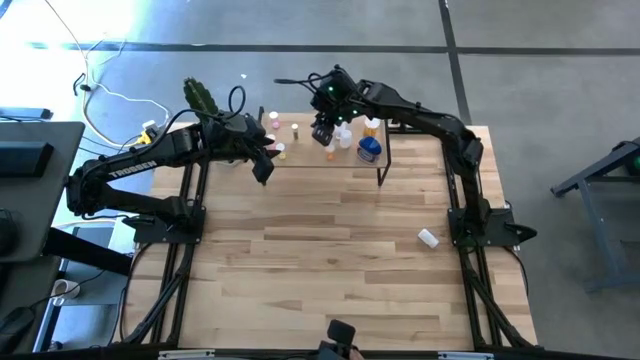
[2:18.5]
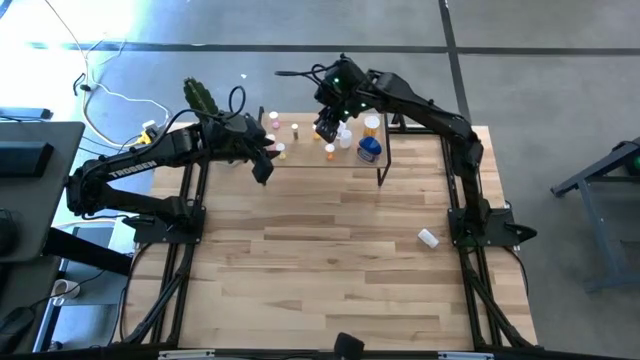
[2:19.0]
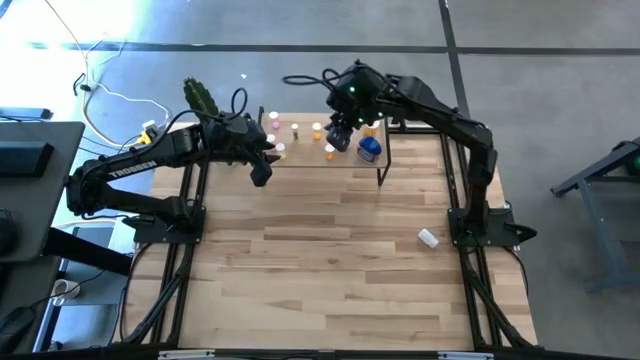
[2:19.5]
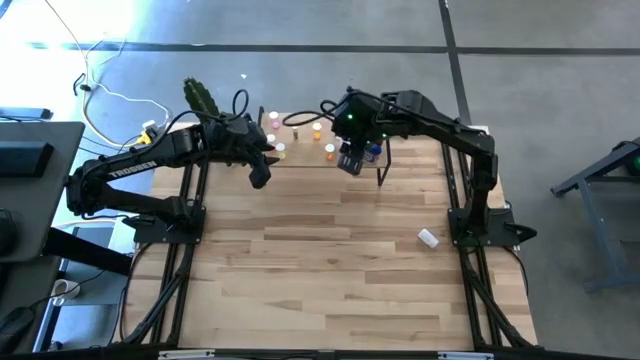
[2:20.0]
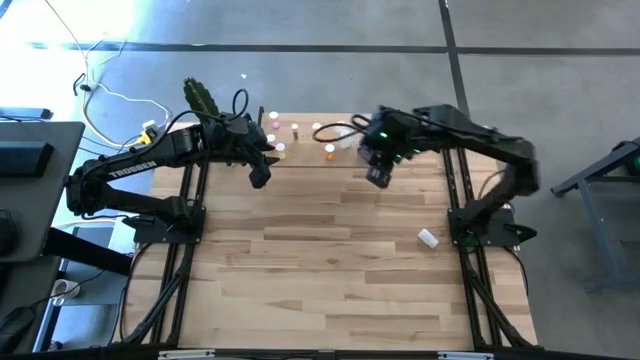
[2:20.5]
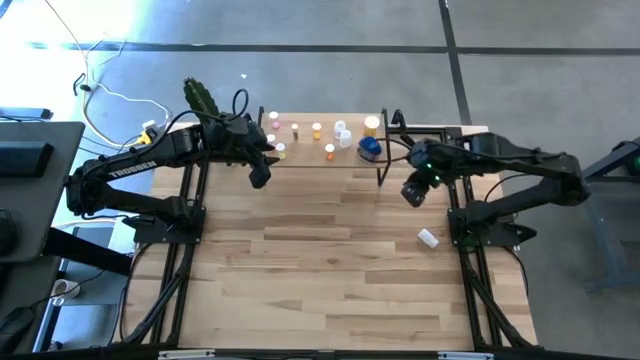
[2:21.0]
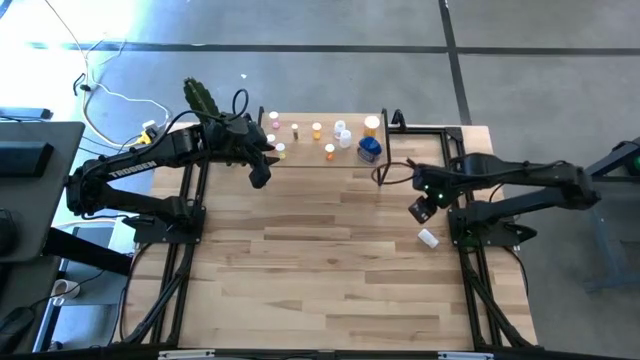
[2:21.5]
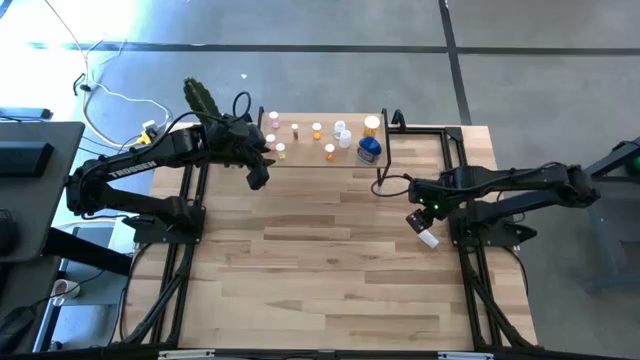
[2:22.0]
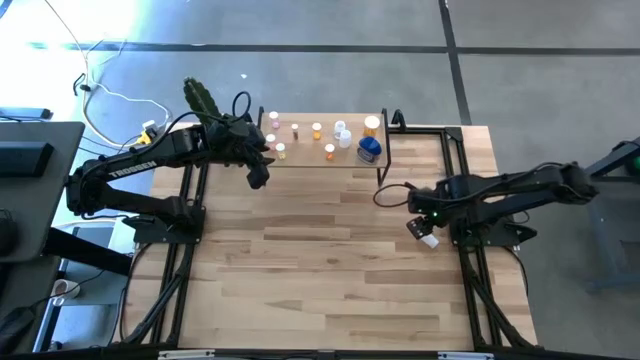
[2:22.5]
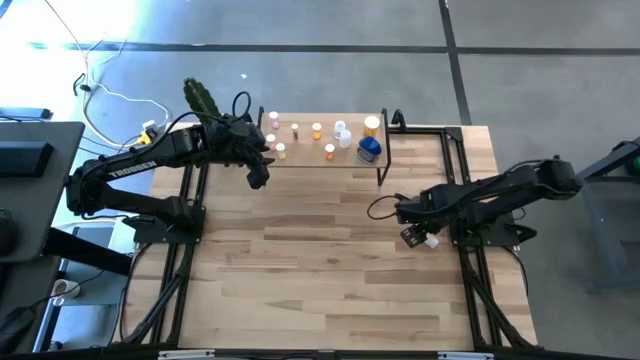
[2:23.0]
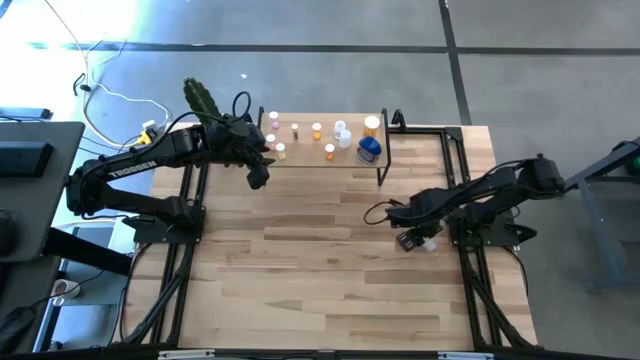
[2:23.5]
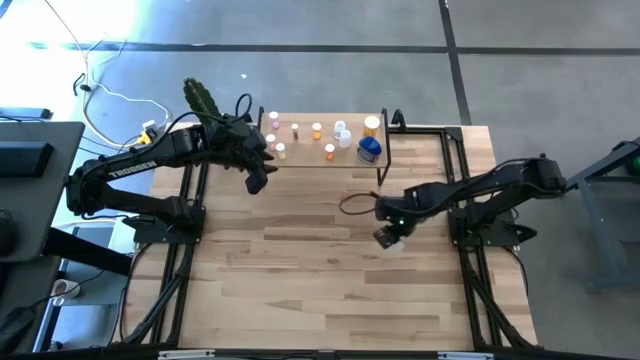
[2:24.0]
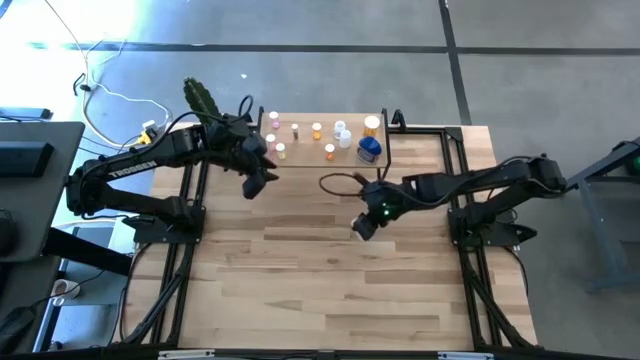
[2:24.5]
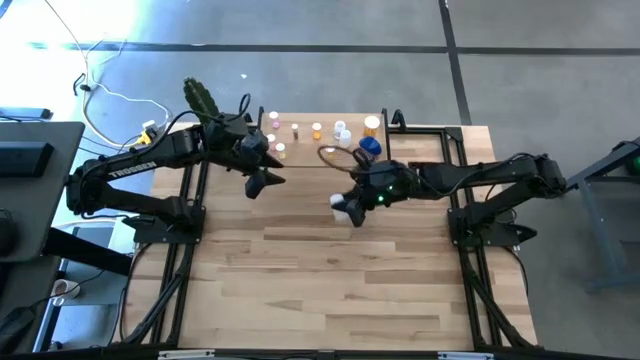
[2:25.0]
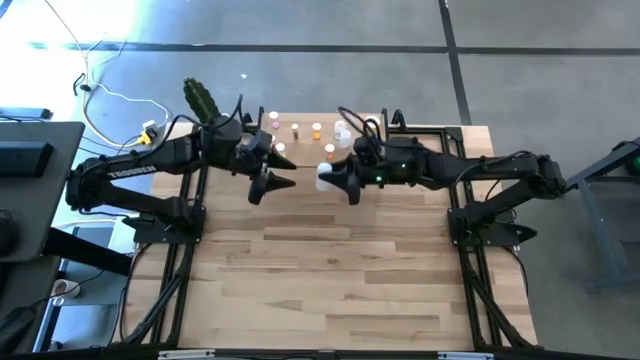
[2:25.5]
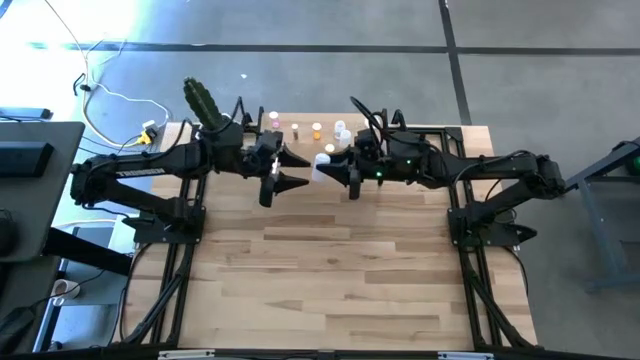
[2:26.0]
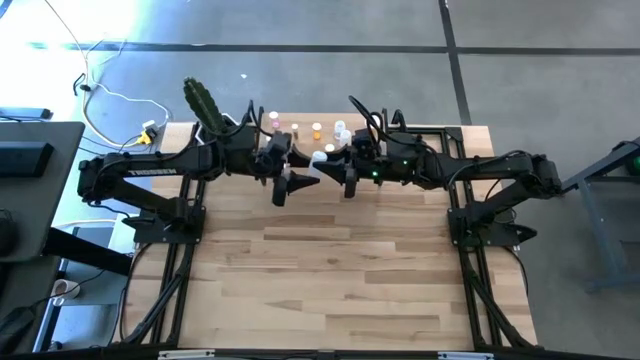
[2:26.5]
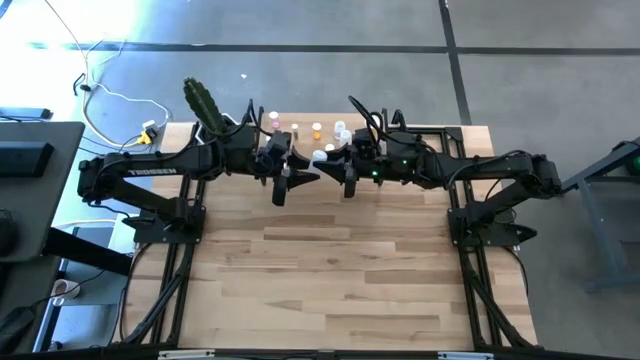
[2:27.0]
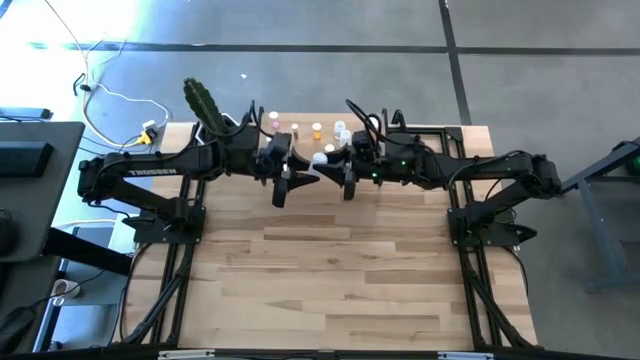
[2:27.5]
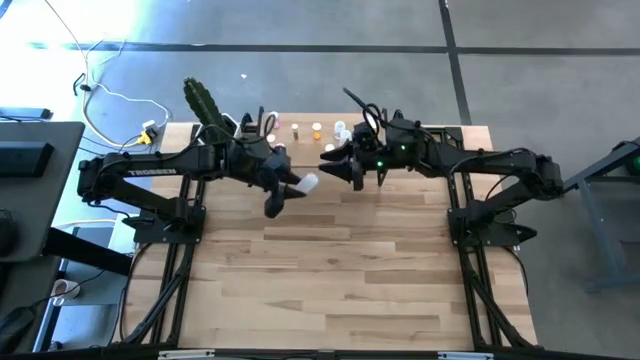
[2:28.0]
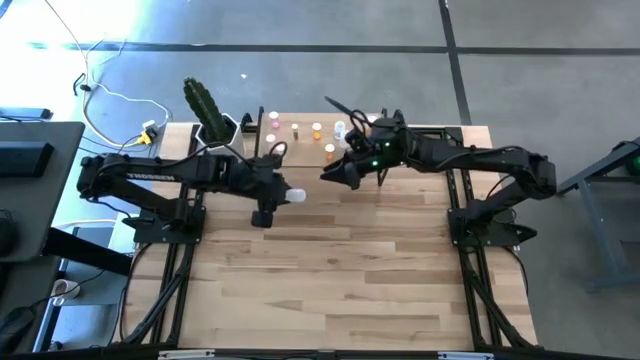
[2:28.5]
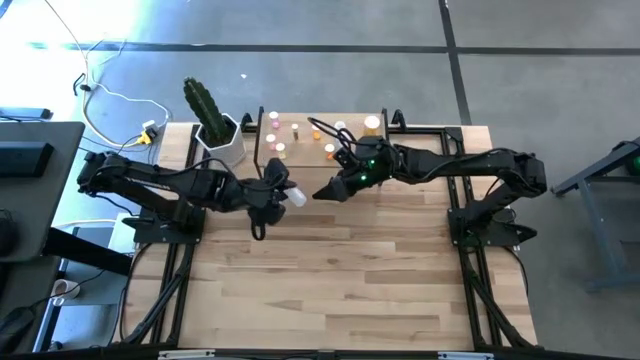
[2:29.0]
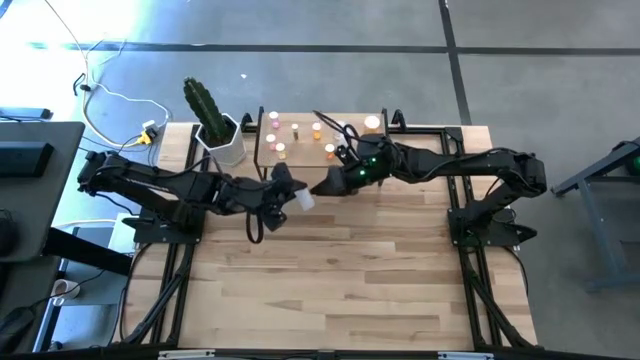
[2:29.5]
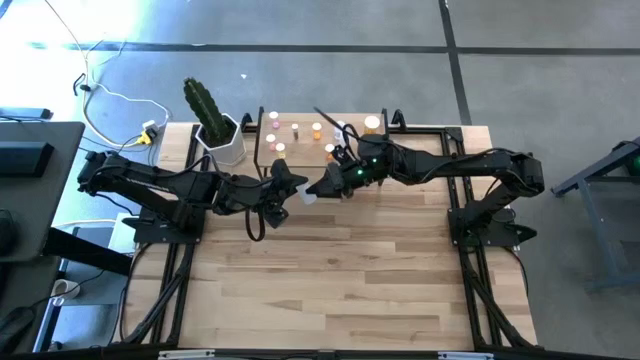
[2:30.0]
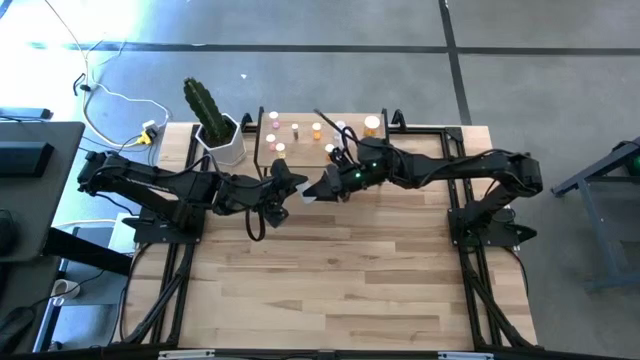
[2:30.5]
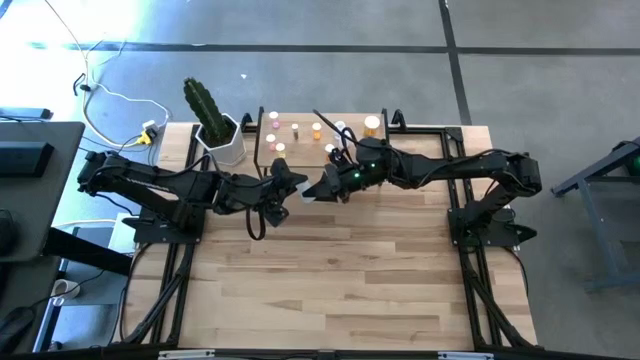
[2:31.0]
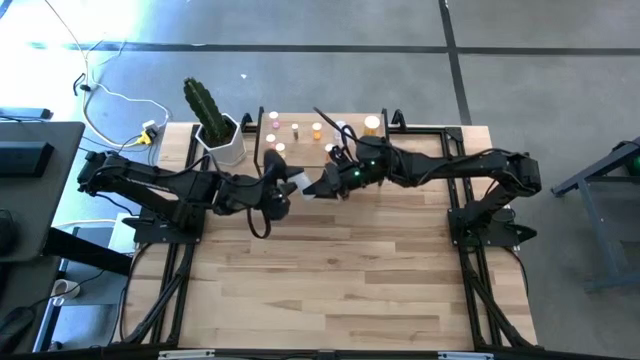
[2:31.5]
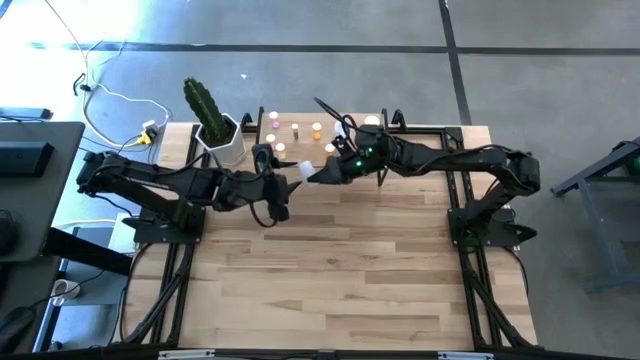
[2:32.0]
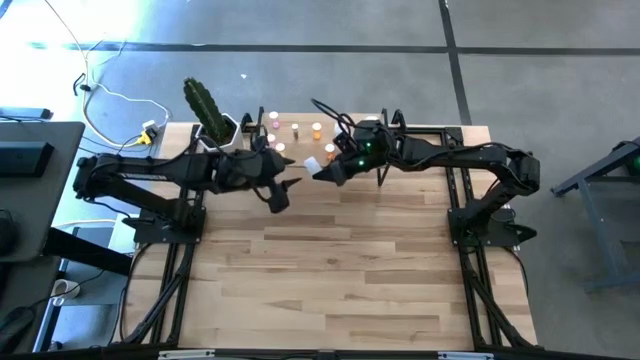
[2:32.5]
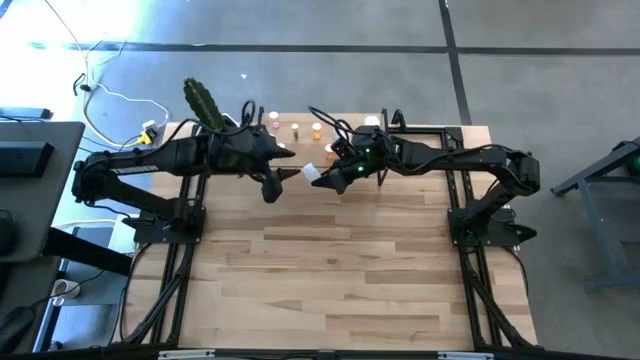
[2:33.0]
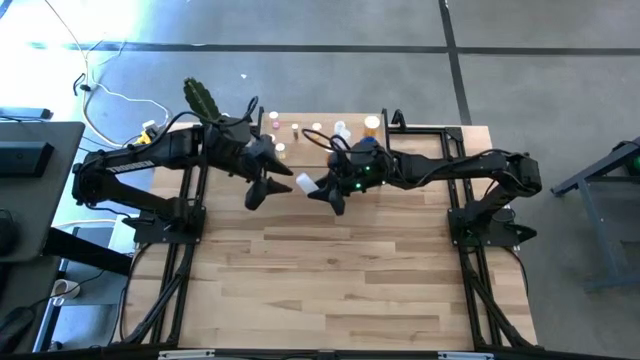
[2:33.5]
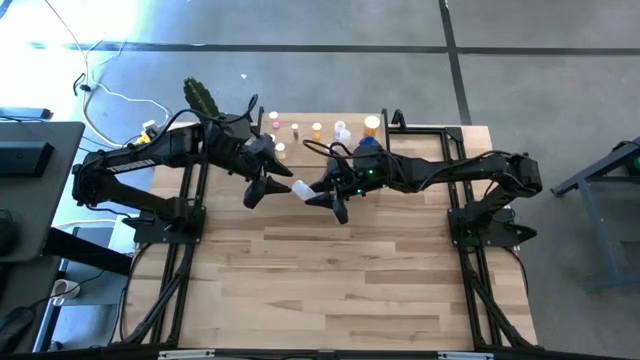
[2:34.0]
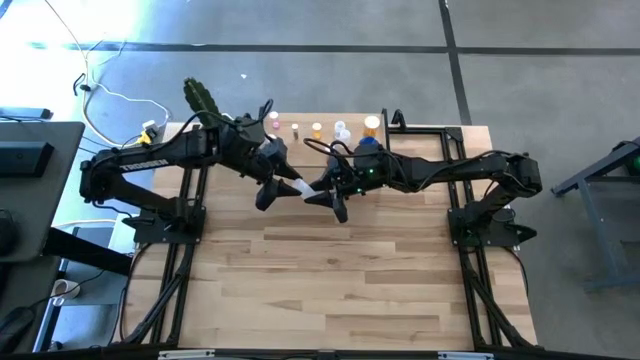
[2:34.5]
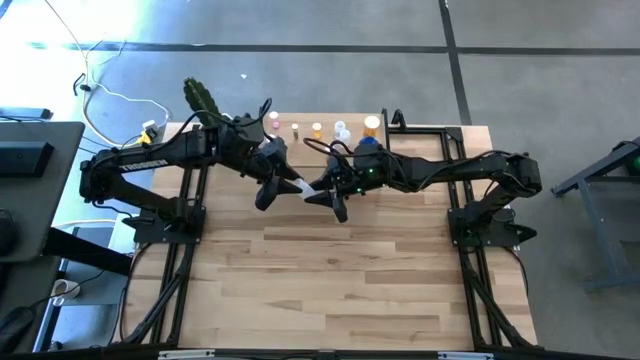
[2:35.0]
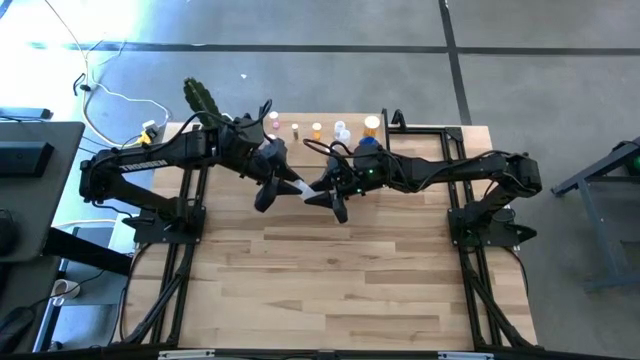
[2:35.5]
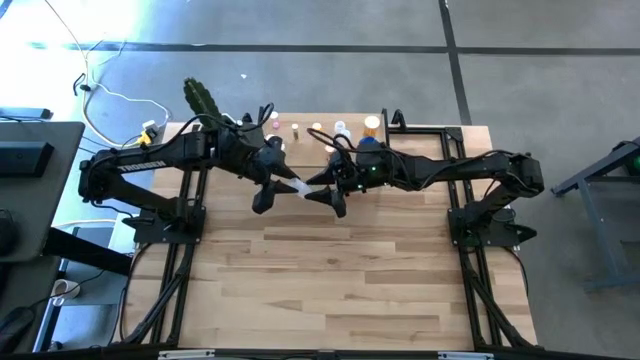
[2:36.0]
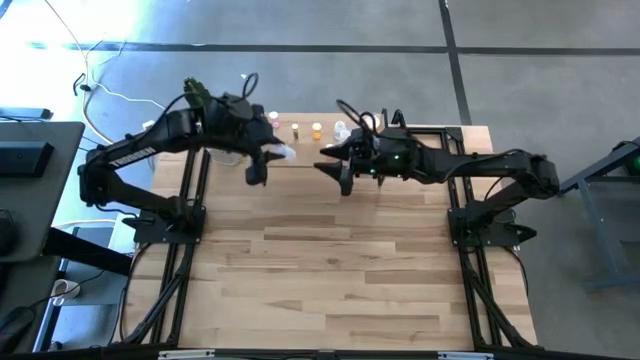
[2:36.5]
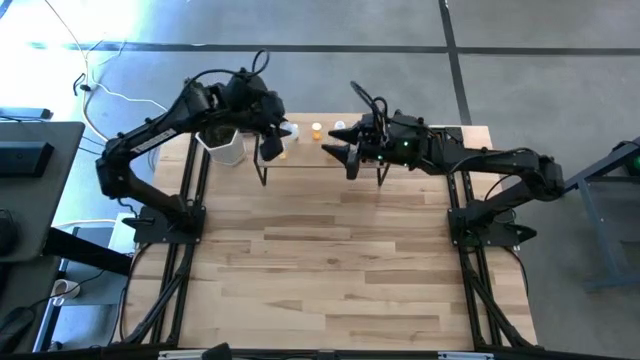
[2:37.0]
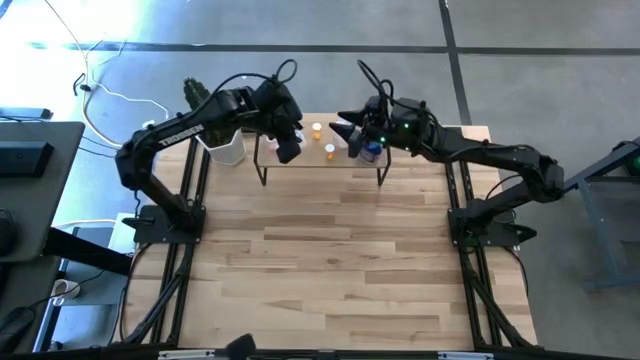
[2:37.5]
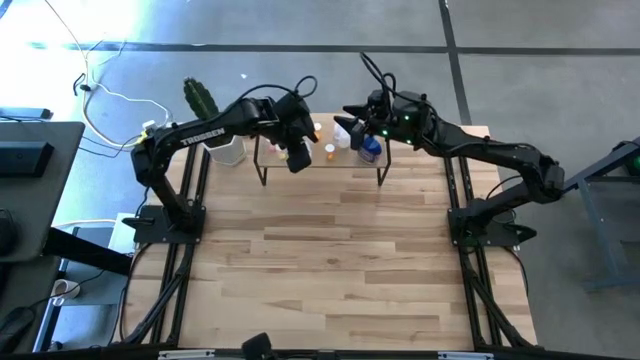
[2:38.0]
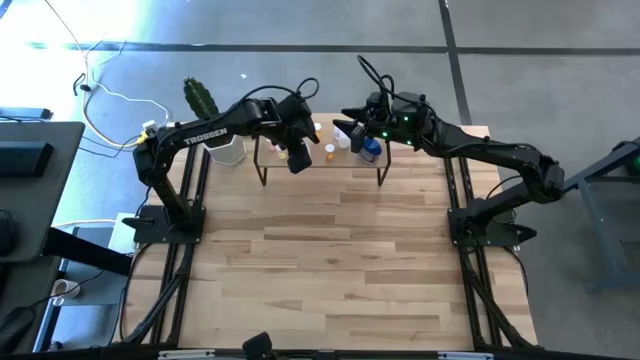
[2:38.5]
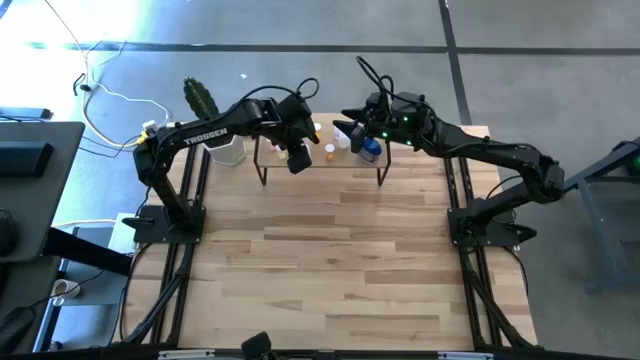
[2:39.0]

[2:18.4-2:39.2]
Task: Pick and place medicine bottles onto shelf by color
Put the white pill bottle on the shelf

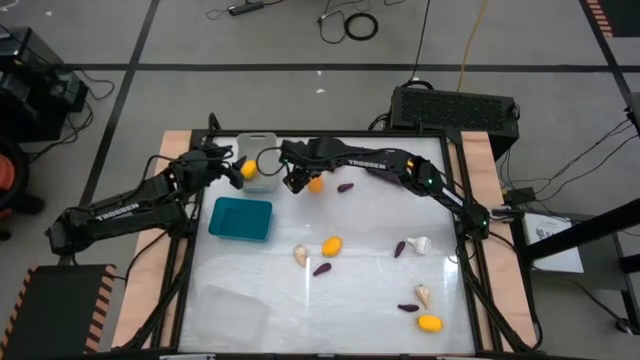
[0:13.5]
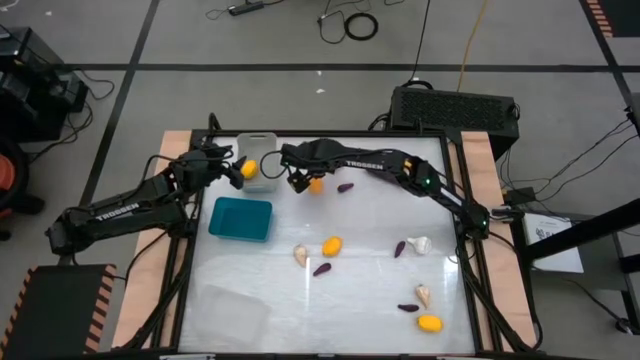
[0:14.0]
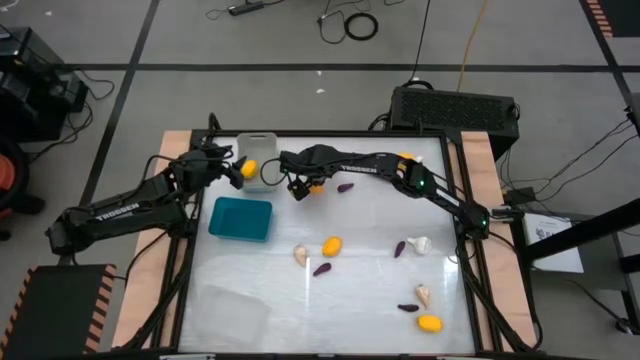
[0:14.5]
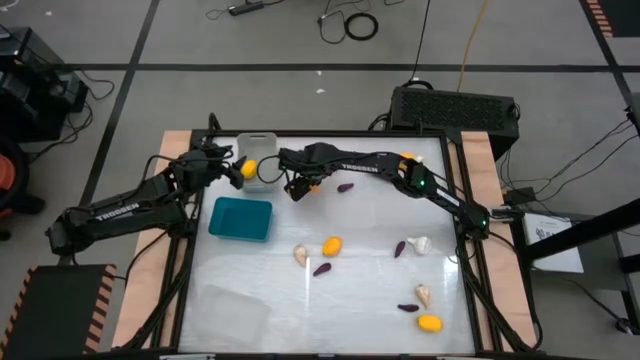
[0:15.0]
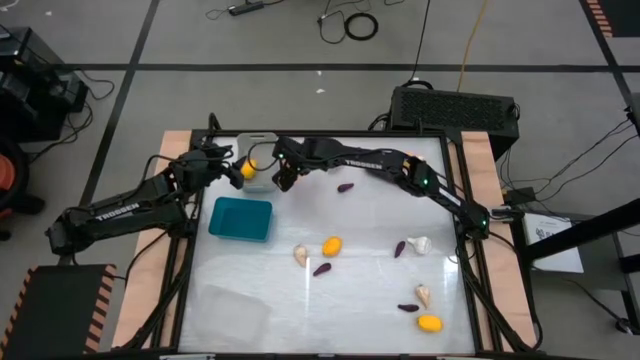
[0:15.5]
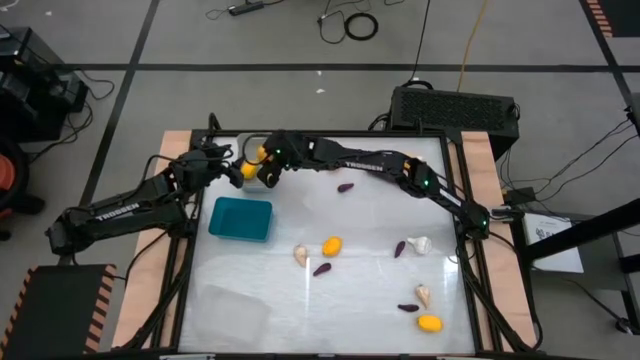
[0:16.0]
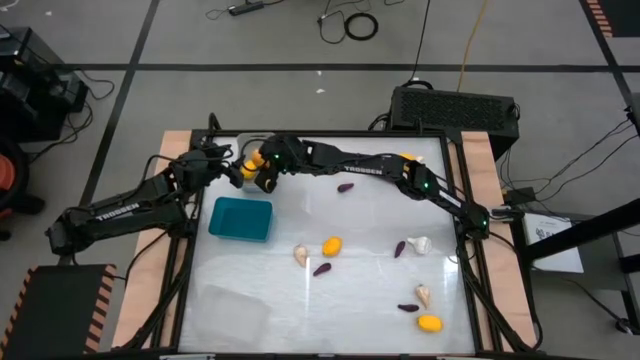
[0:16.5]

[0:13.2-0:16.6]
Task: Sort produce into baskets
Put the yellow lemon into the gray bin
